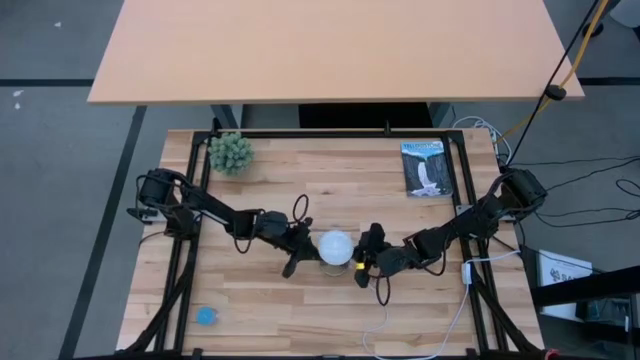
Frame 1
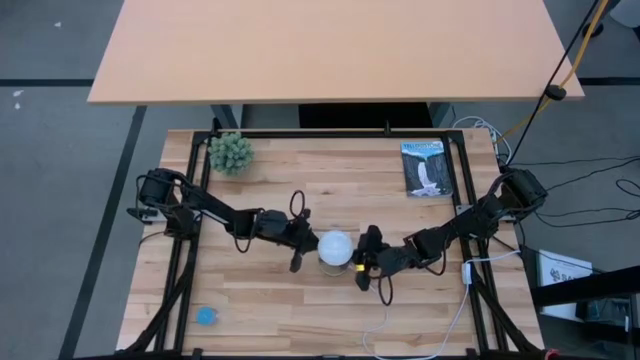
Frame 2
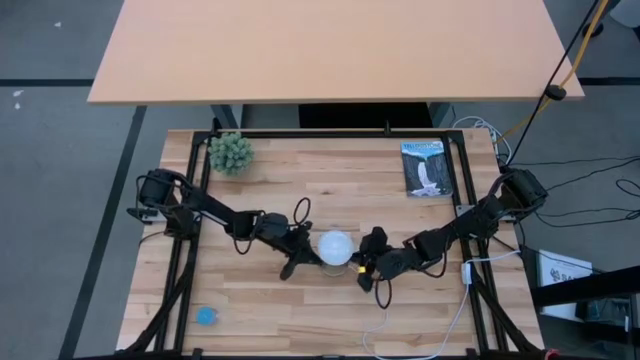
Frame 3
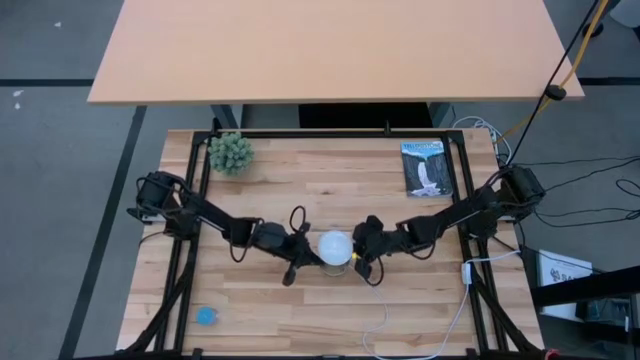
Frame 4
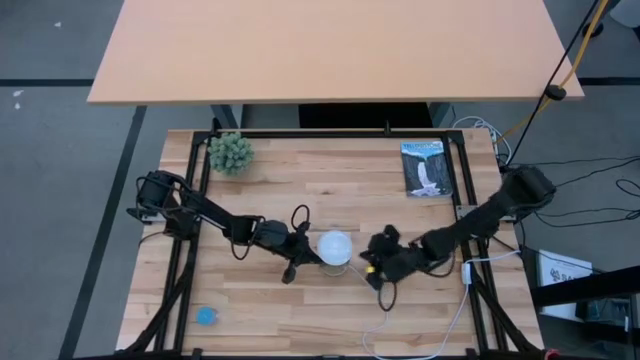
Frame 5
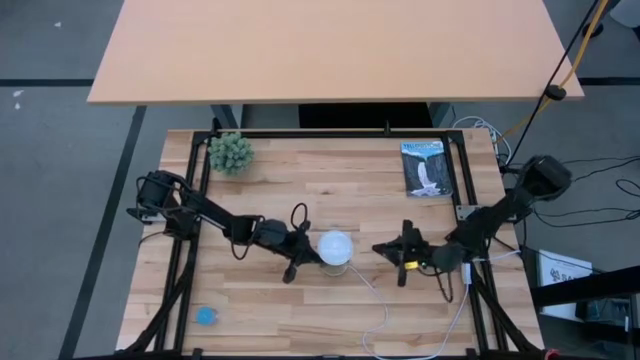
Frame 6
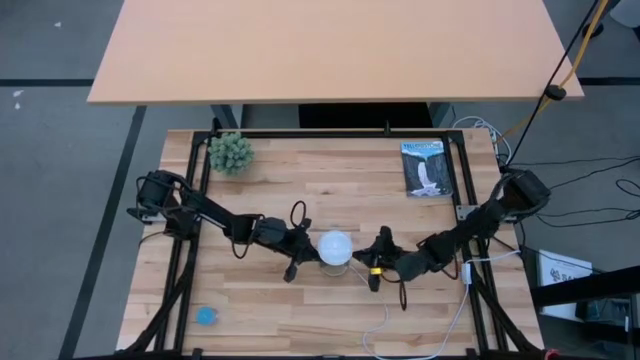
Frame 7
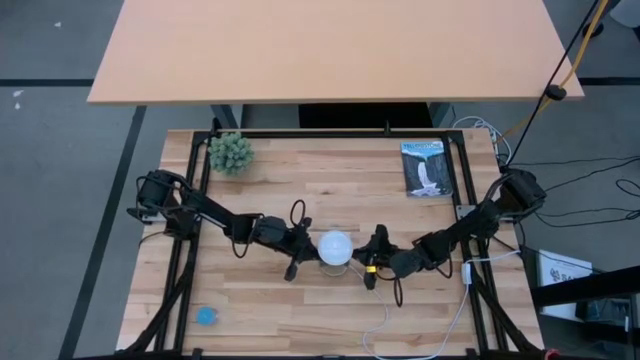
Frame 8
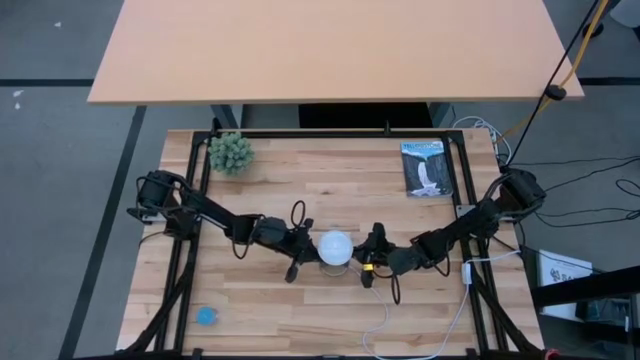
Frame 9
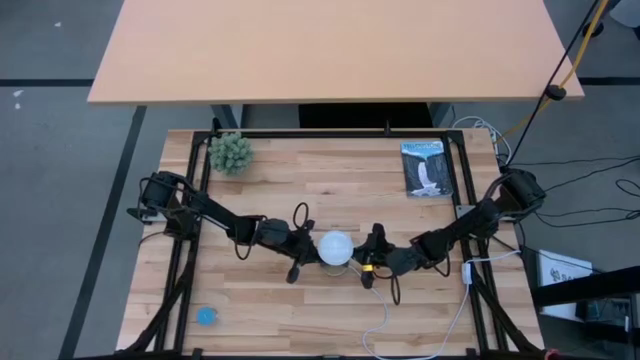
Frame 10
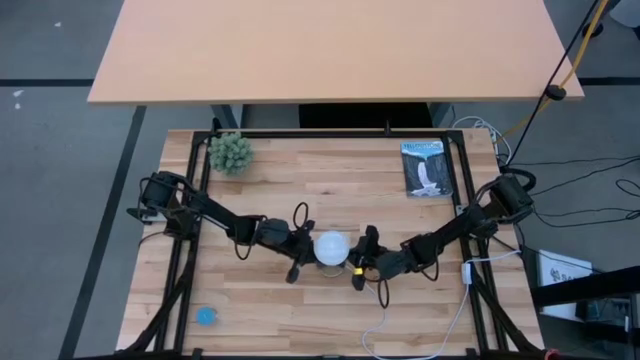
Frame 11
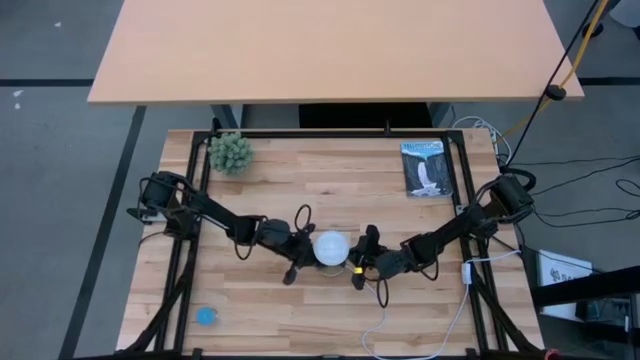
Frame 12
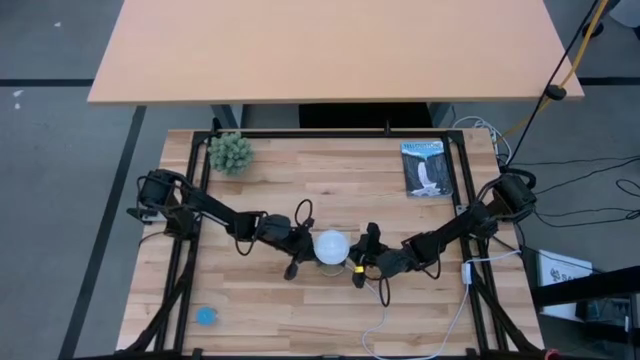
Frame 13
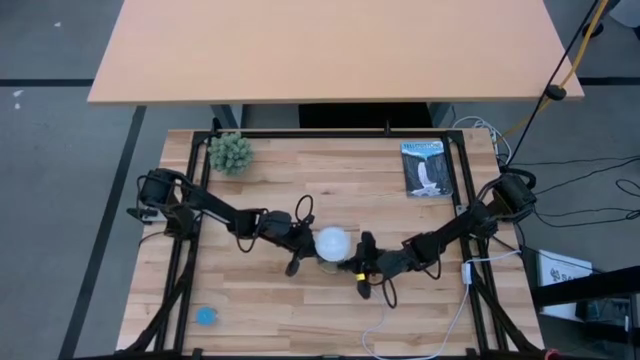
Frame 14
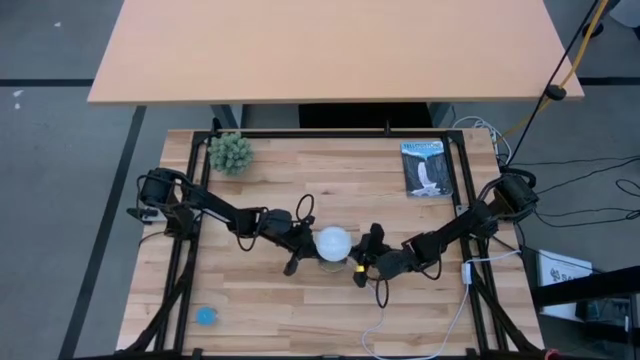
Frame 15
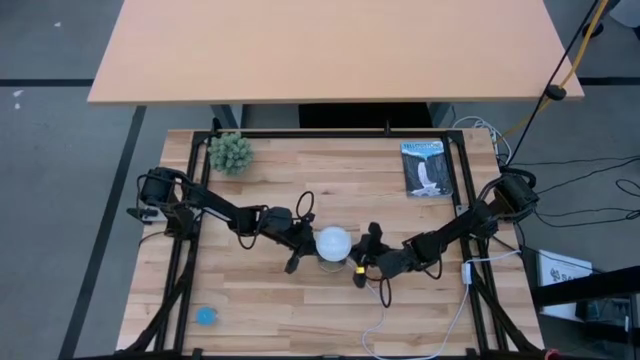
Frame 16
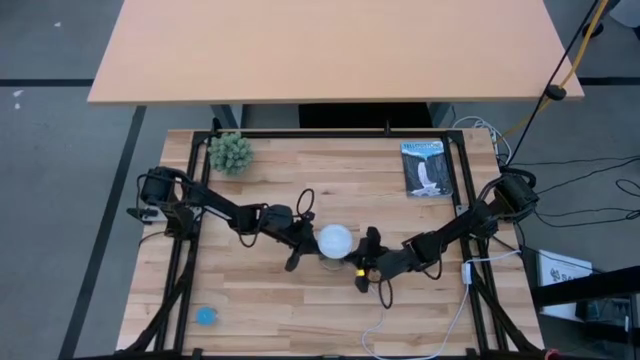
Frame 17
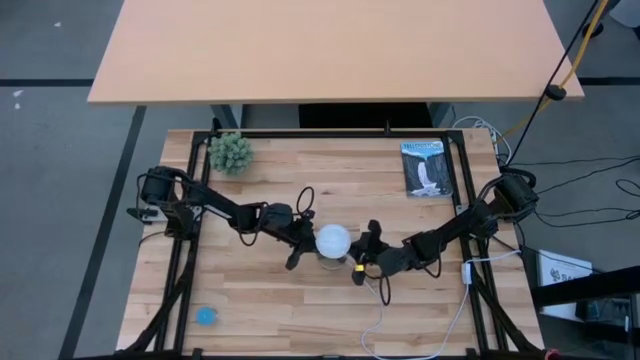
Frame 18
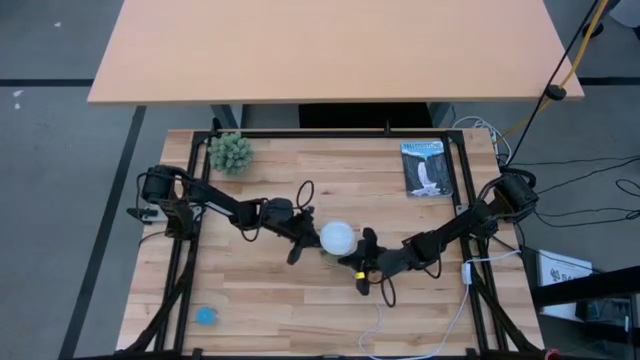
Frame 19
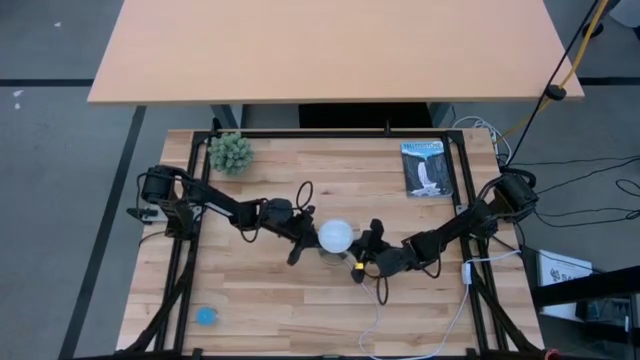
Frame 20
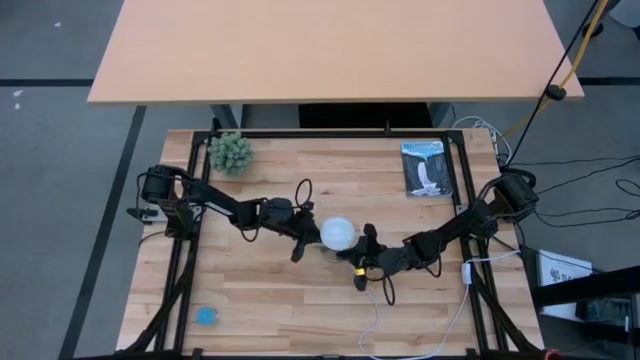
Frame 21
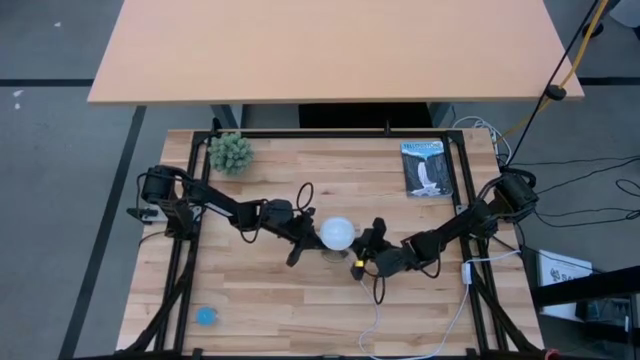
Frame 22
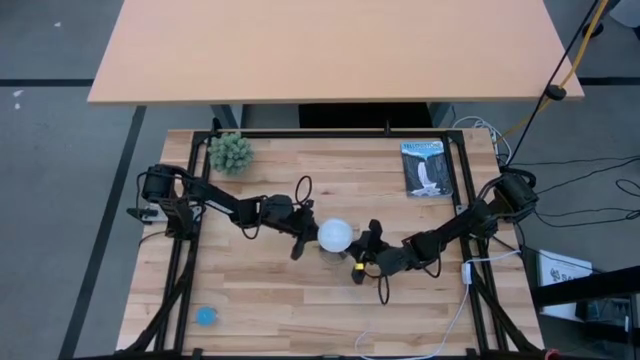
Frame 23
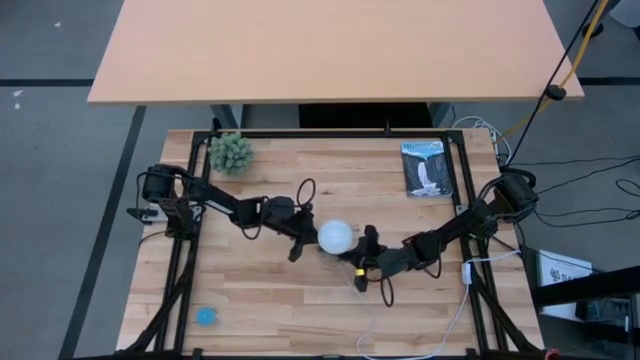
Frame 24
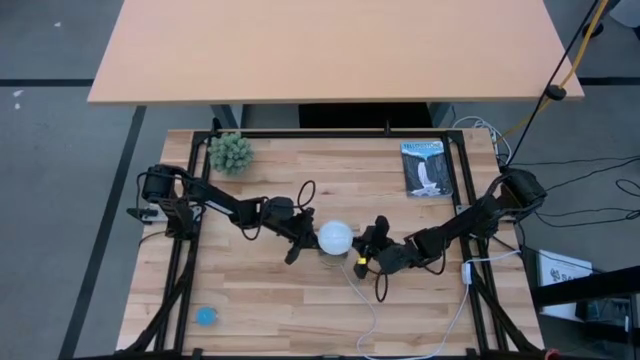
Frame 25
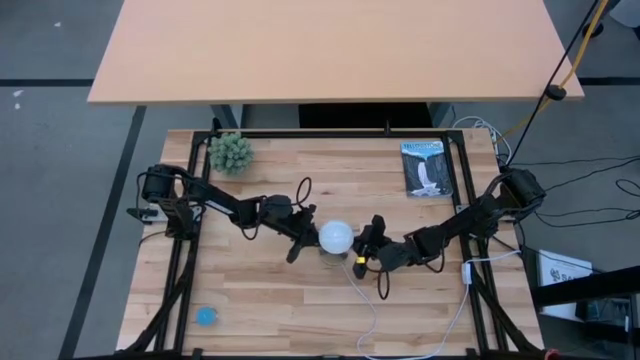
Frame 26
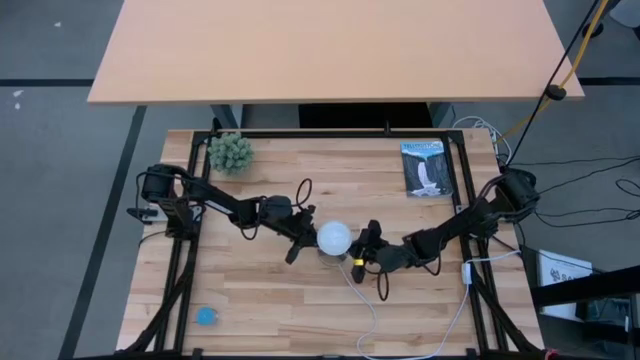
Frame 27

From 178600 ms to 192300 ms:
Task: Screw lightbulb
Insert the white light bulb into the gold lamp

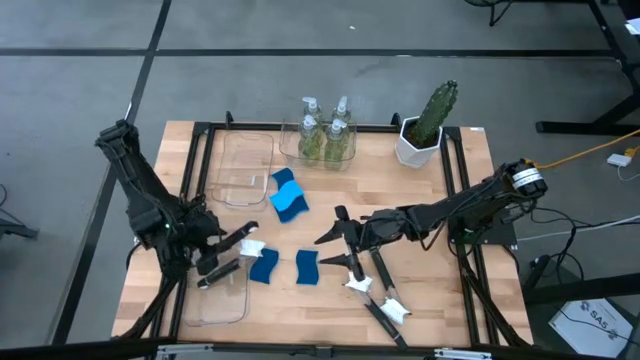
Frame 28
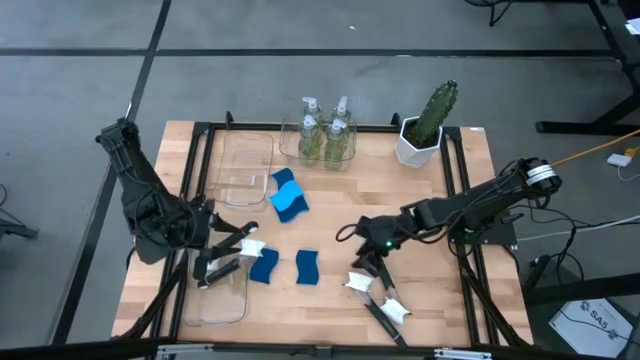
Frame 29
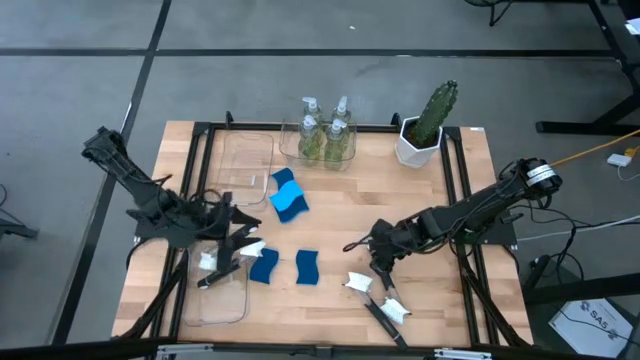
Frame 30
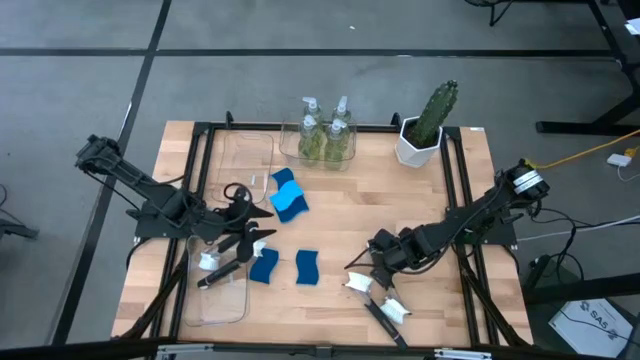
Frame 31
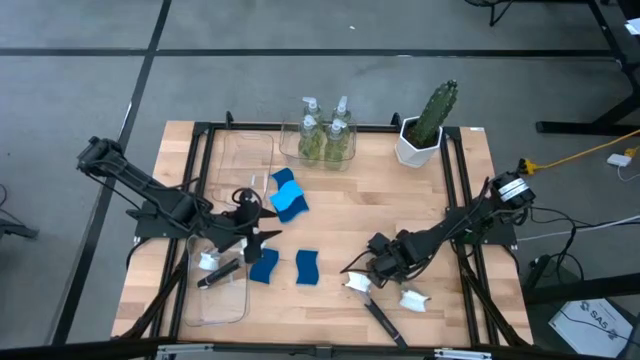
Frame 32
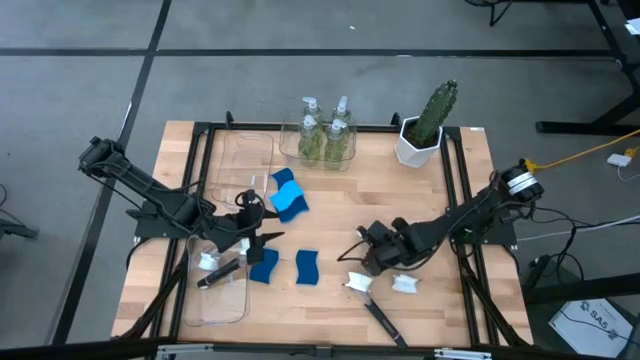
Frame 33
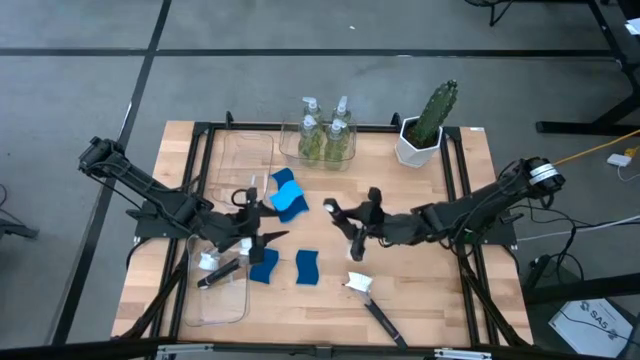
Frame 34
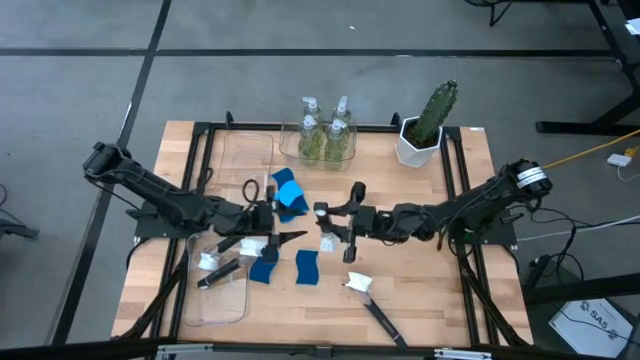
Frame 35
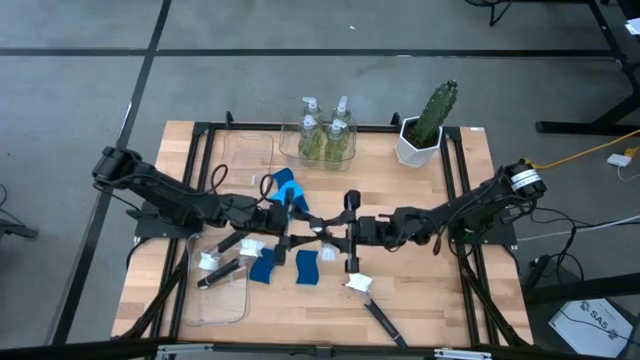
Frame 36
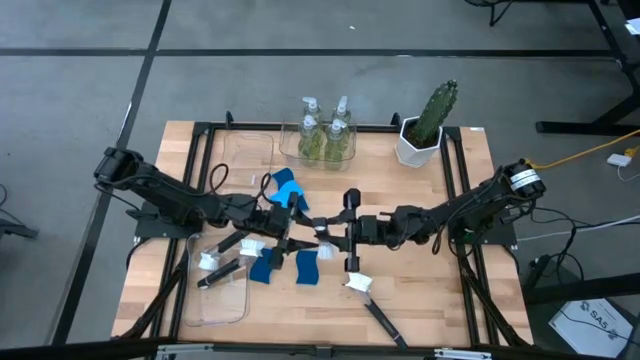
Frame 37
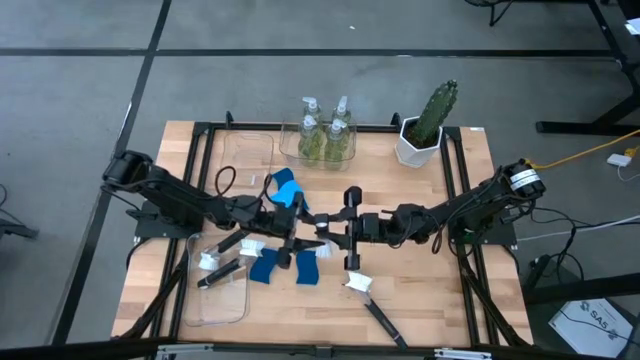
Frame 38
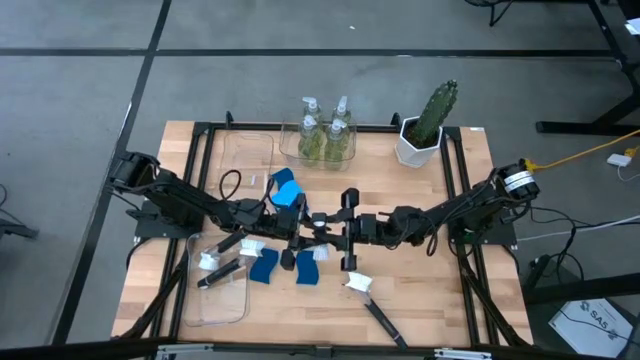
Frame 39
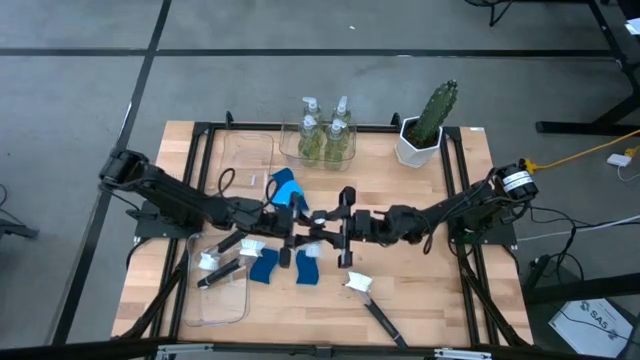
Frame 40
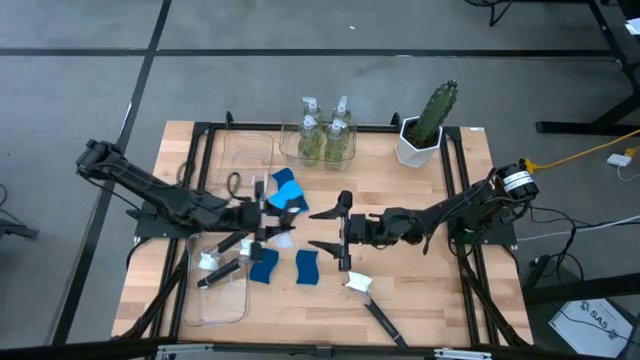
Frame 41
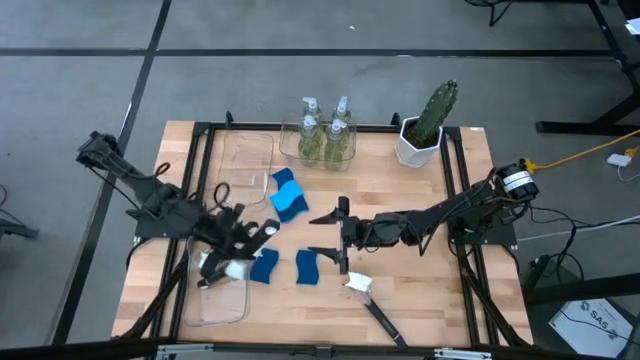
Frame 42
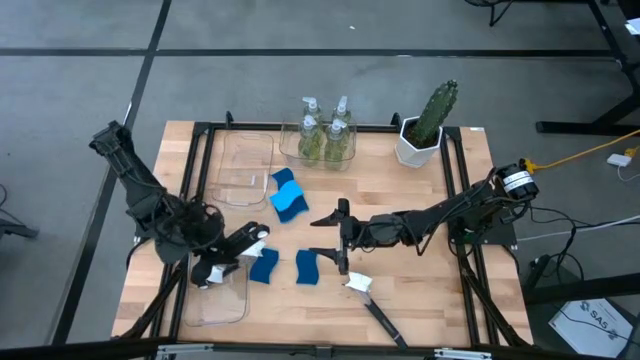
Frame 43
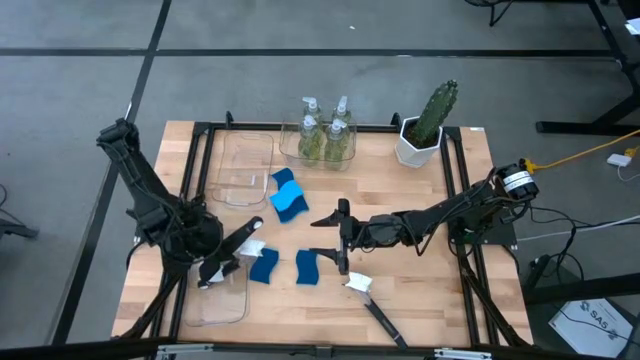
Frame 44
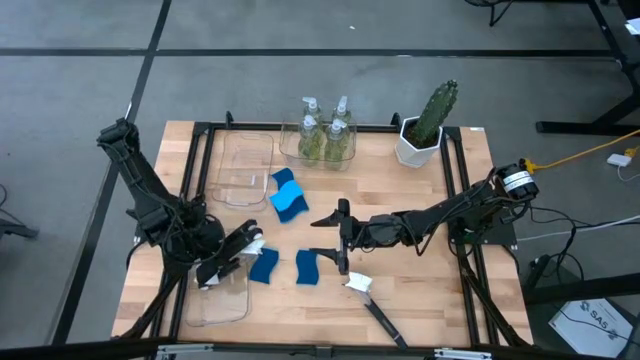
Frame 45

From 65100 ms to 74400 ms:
Task: Pick & Place Kitchen Sink Supplies
Put the black dish brush into the bottom left transparent bin
